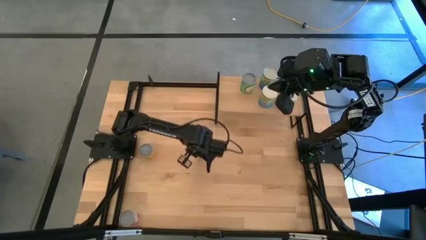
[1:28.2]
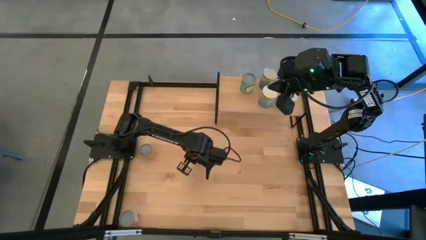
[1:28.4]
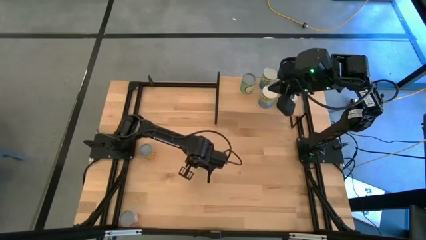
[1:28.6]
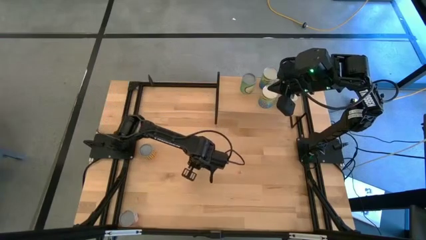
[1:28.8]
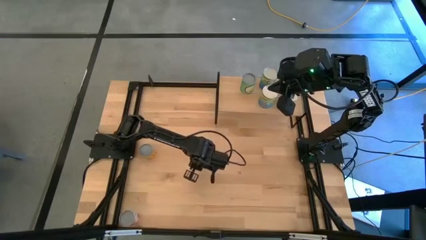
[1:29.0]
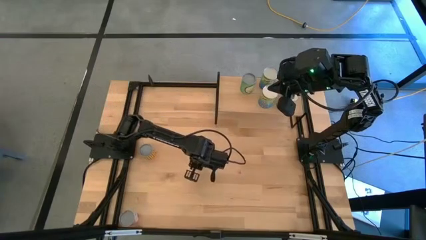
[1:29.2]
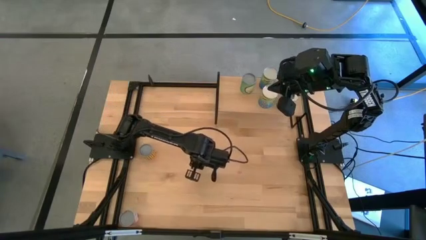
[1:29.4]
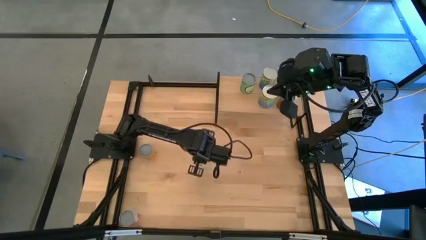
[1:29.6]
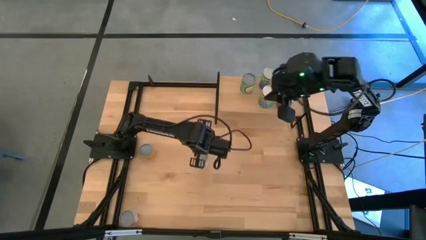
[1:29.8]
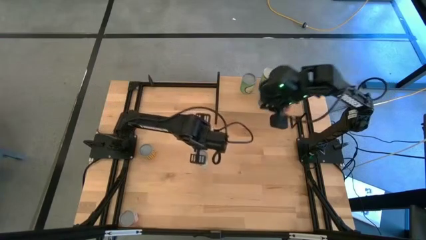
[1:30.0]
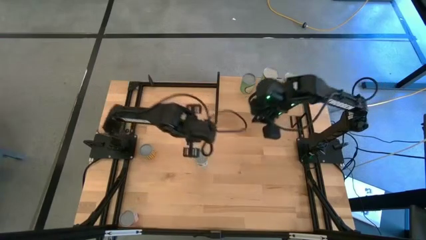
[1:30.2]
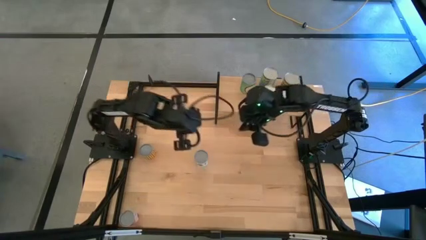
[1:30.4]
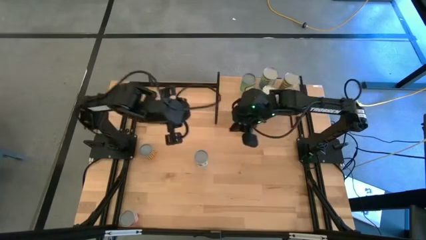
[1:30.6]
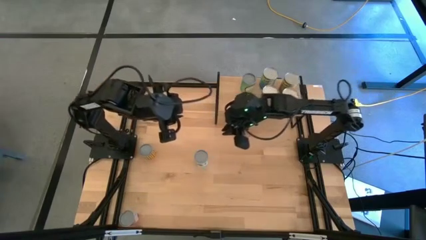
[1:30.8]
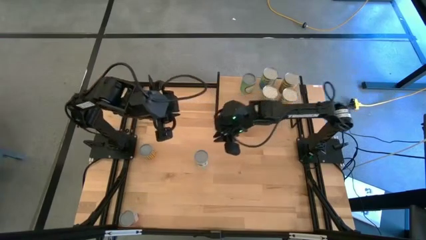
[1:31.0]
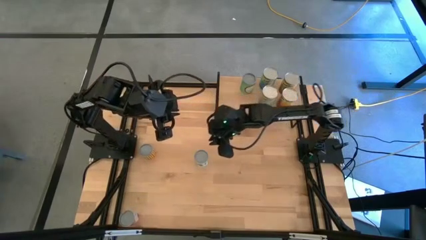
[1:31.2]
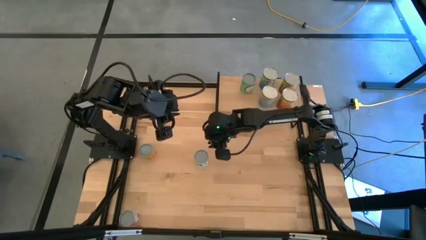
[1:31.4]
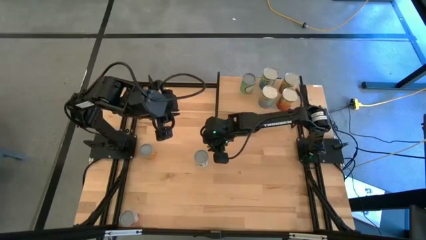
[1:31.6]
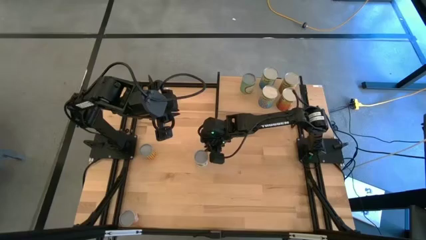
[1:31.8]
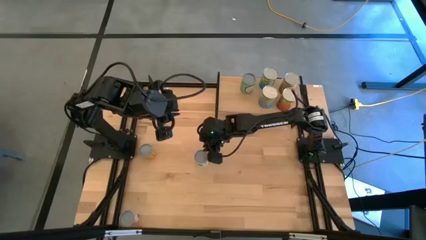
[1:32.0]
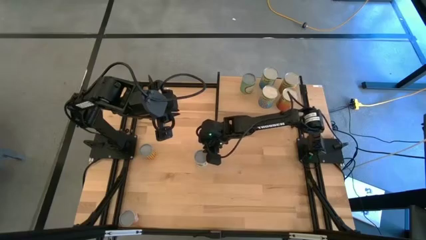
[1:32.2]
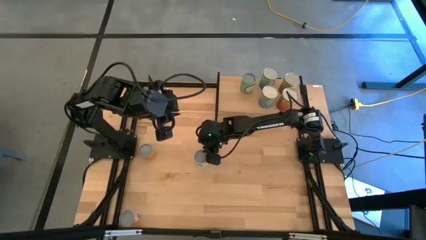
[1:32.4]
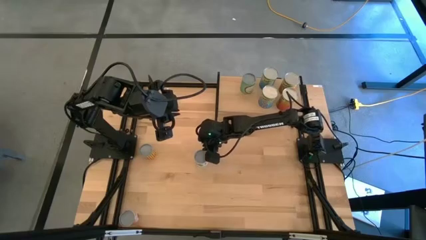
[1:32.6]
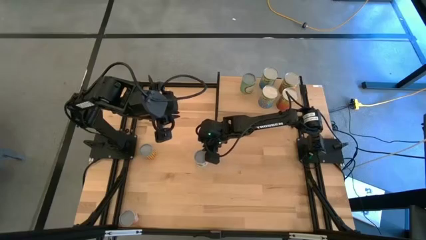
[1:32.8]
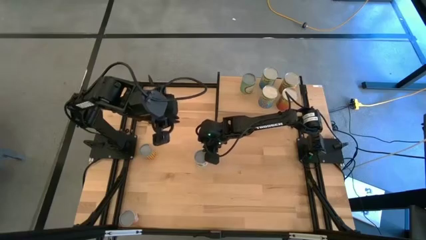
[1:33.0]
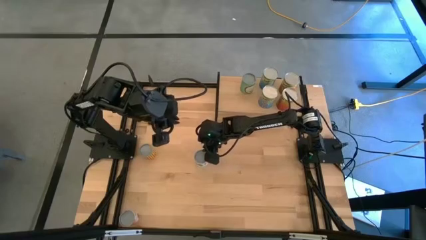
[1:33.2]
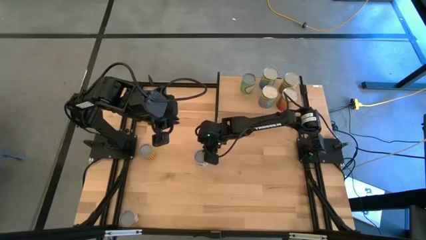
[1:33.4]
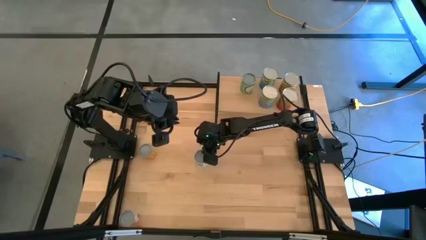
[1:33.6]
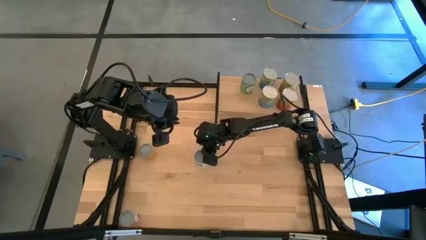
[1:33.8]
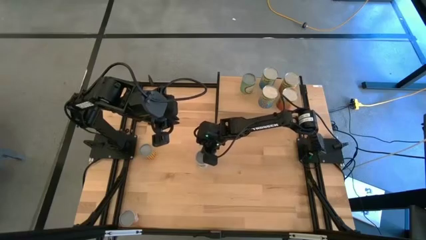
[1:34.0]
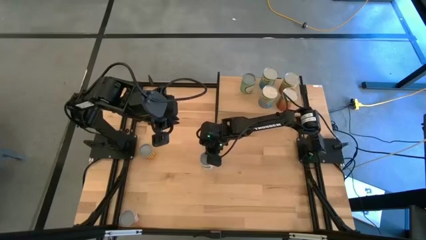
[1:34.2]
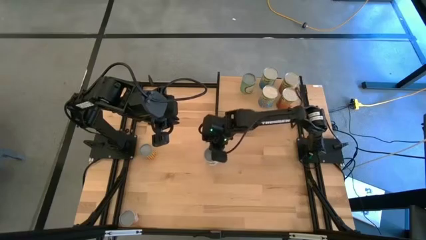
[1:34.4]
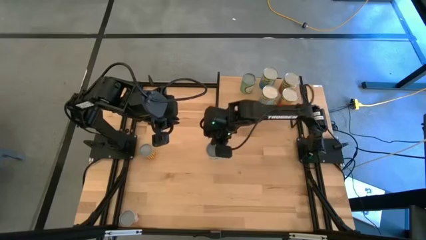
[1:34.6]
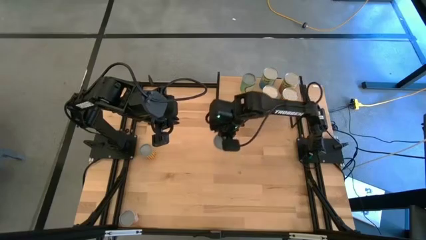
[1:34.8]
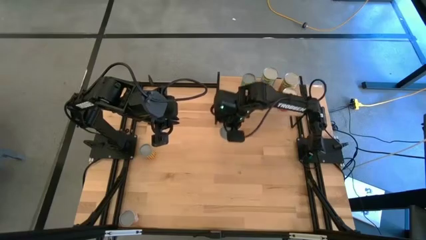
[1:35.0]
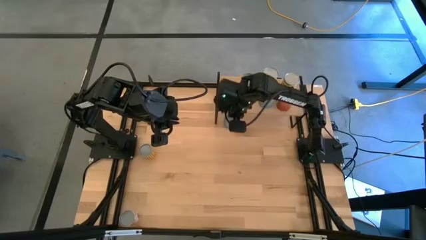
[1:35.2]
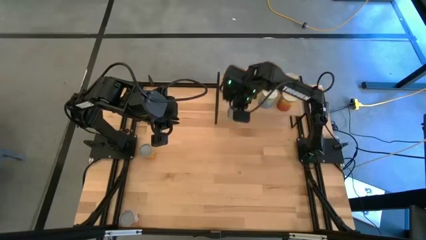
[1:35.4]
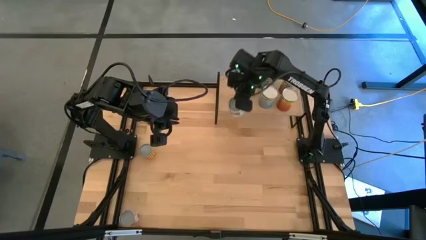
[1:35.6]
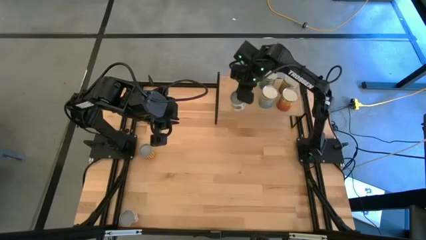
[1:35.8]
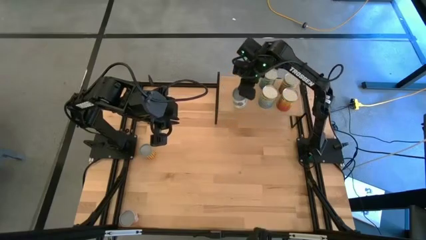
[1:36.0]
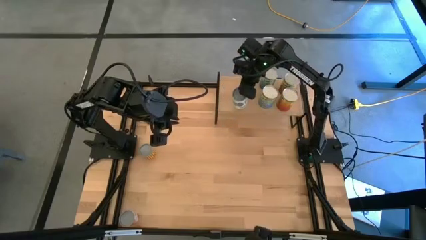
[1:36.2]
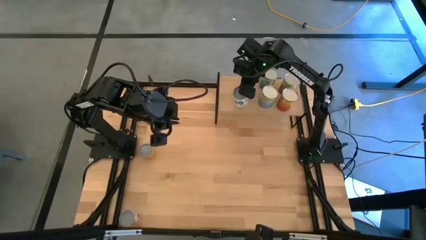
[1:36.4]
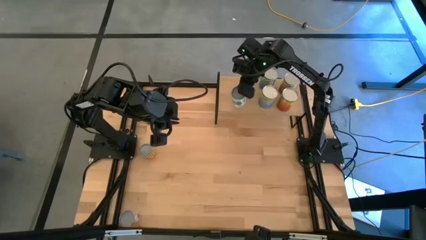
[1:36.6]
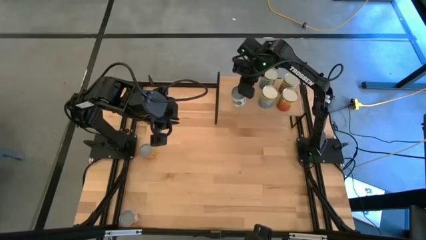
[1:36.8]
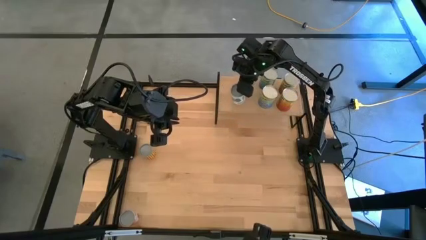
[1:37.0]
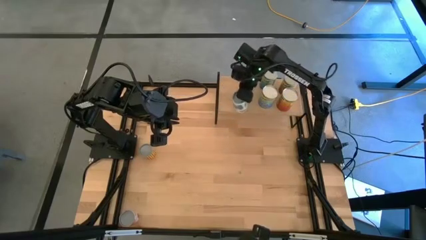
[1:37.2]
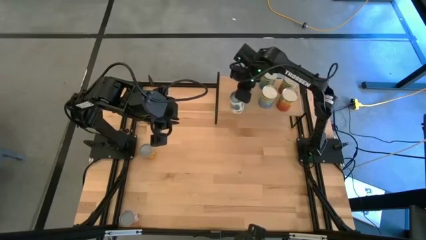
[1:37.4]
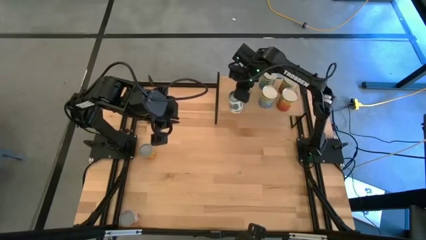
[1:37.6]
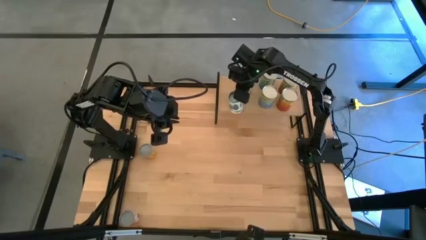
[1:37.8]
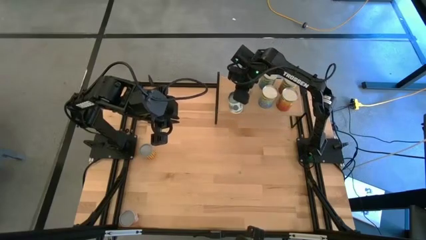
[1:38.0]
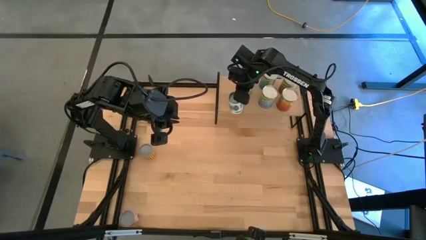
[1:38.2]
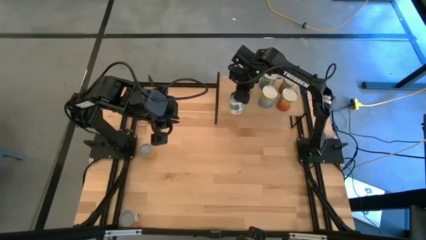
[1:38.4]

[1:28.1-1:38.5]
Task: Pick and place cans onto a shelf
Put the white canned good on the shelf
